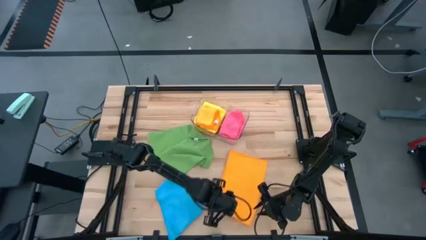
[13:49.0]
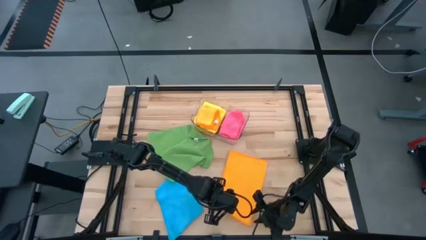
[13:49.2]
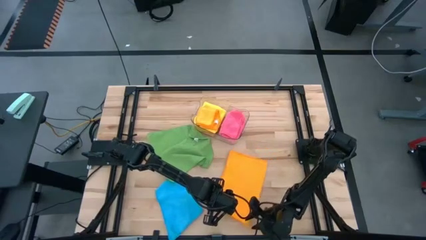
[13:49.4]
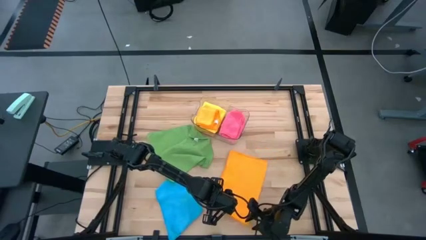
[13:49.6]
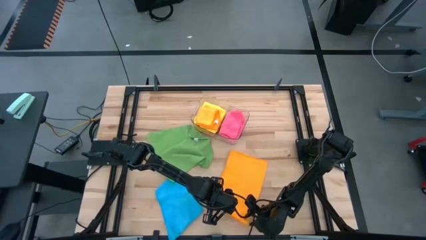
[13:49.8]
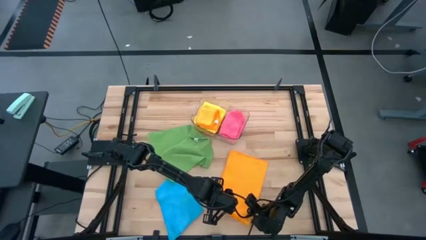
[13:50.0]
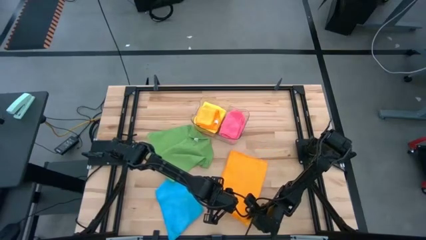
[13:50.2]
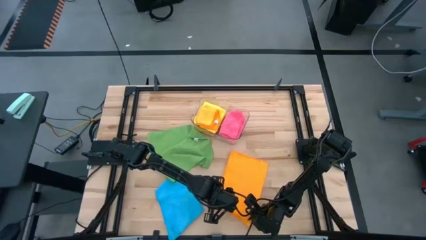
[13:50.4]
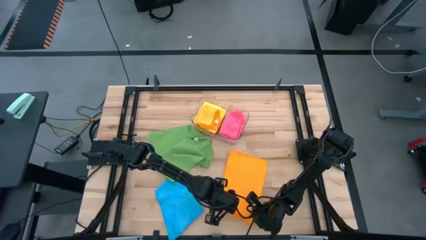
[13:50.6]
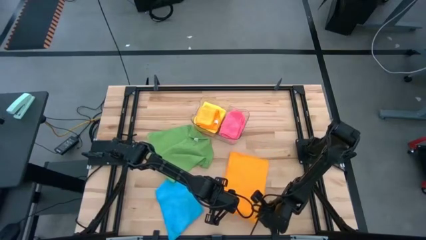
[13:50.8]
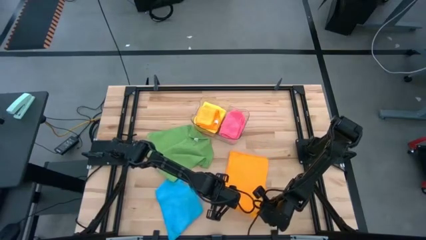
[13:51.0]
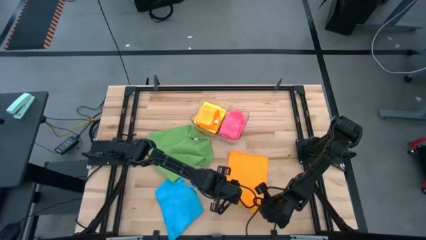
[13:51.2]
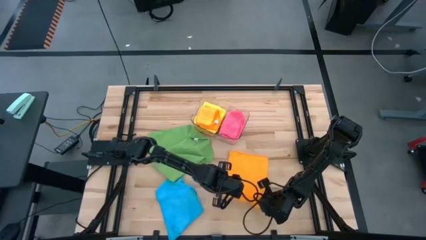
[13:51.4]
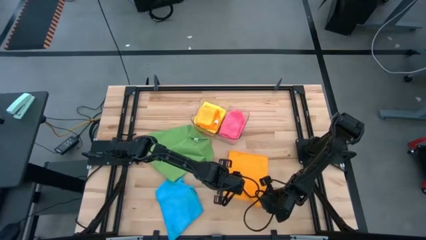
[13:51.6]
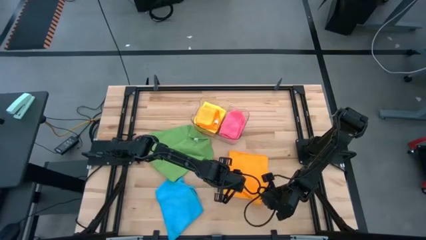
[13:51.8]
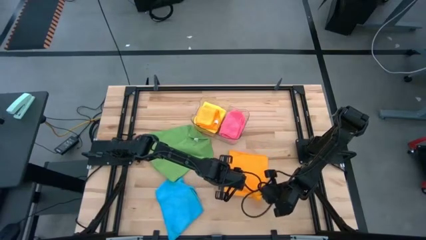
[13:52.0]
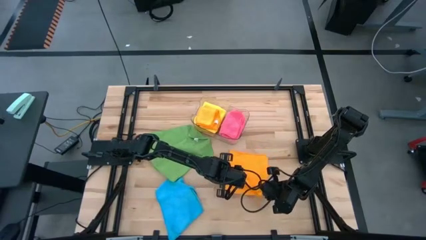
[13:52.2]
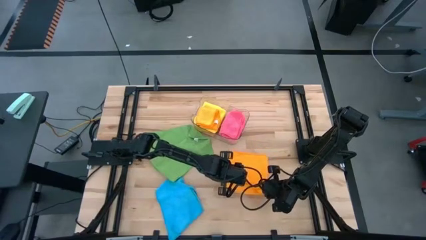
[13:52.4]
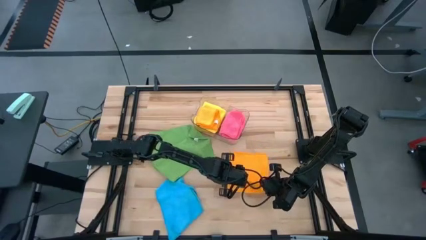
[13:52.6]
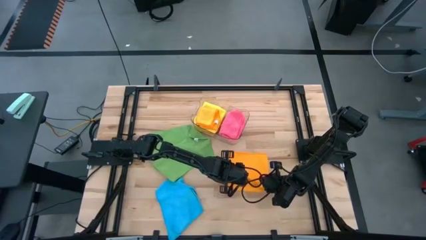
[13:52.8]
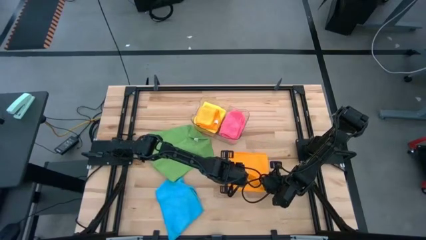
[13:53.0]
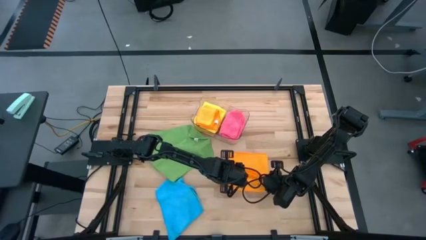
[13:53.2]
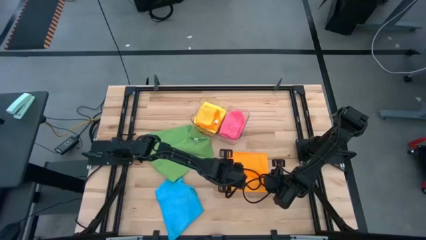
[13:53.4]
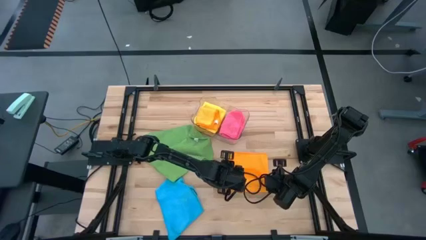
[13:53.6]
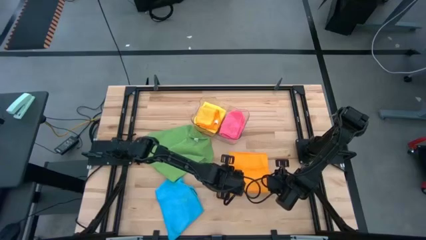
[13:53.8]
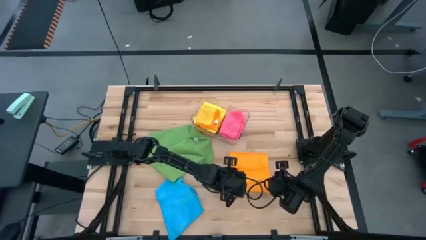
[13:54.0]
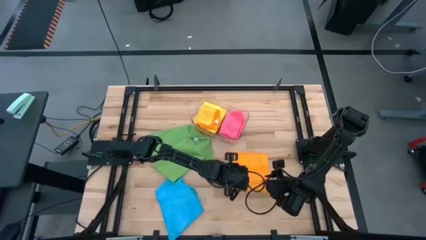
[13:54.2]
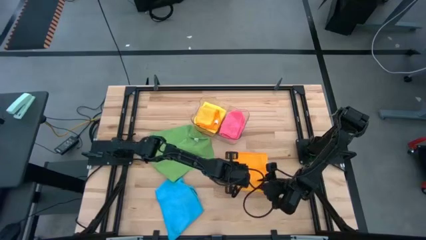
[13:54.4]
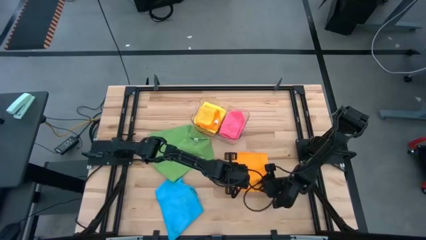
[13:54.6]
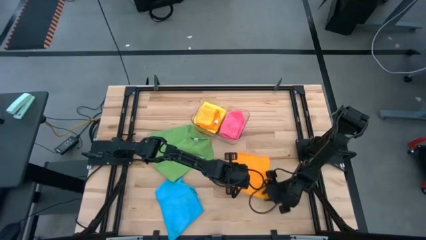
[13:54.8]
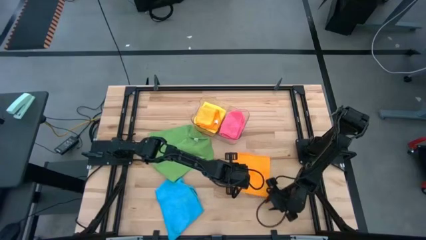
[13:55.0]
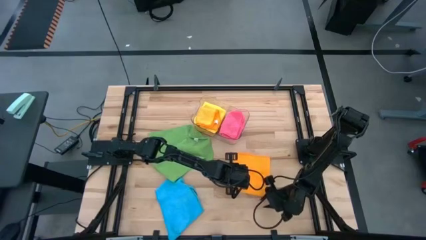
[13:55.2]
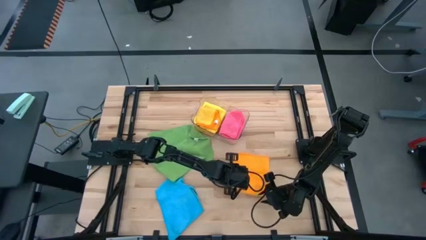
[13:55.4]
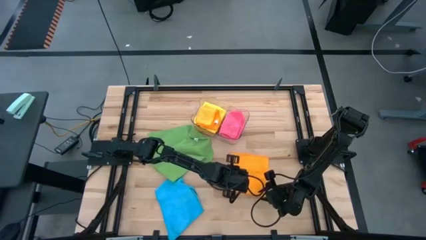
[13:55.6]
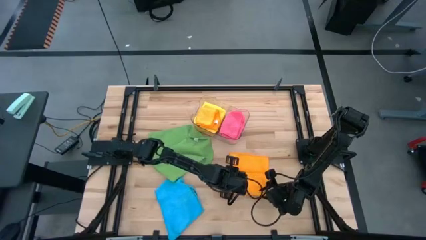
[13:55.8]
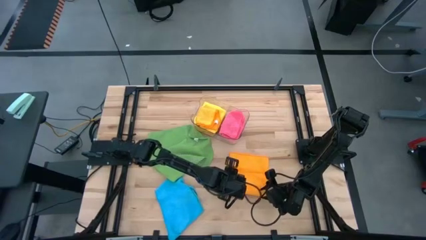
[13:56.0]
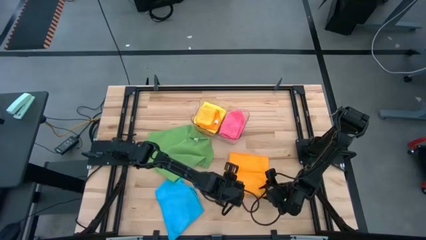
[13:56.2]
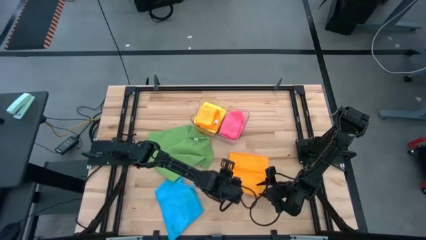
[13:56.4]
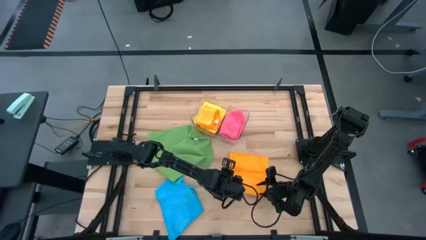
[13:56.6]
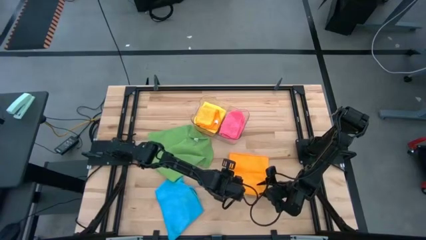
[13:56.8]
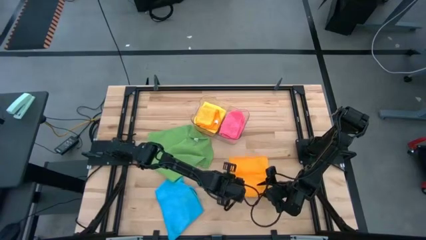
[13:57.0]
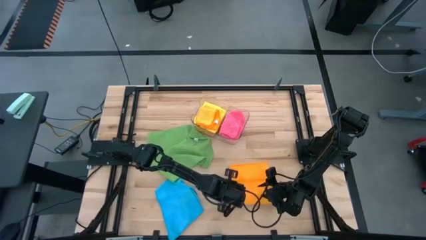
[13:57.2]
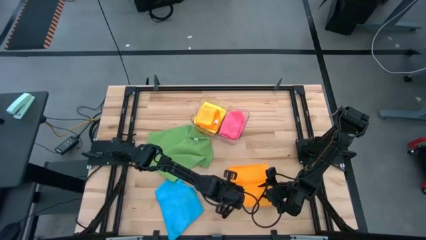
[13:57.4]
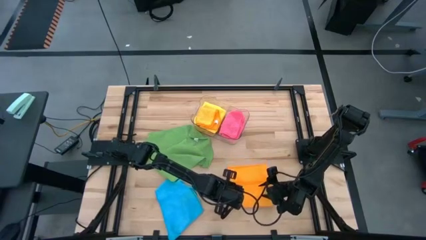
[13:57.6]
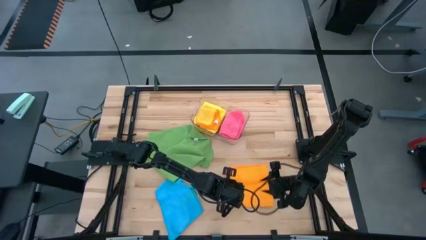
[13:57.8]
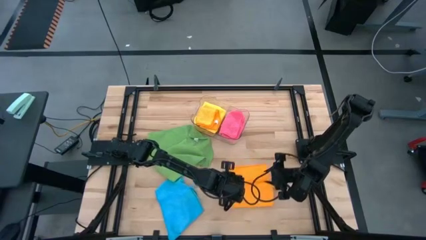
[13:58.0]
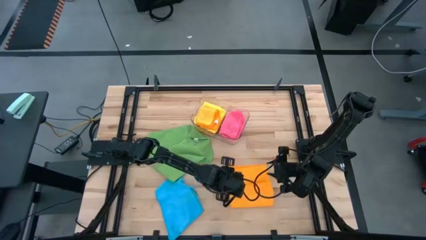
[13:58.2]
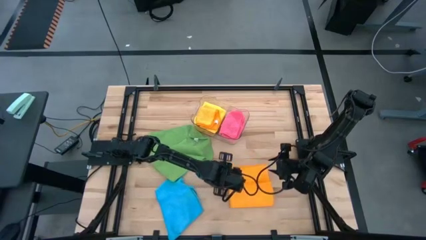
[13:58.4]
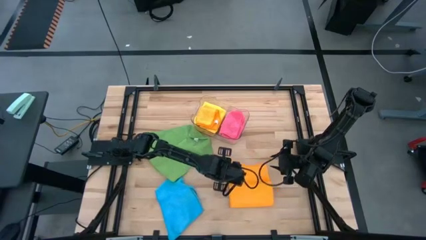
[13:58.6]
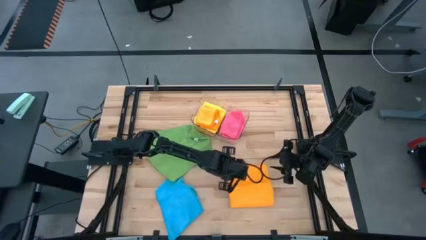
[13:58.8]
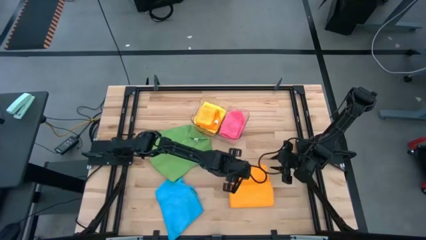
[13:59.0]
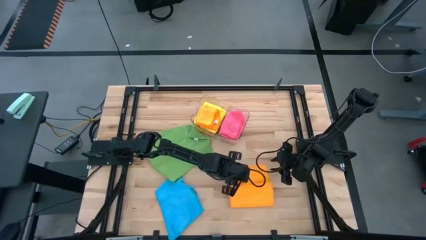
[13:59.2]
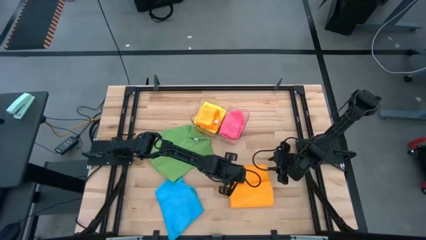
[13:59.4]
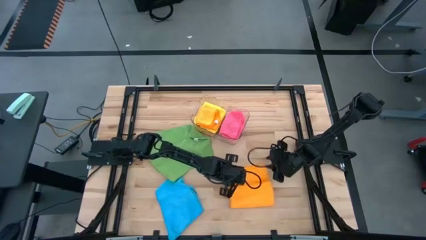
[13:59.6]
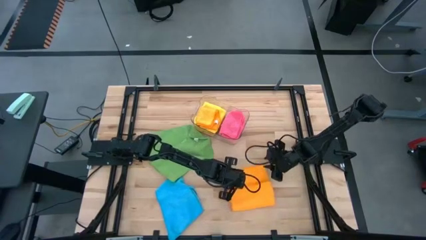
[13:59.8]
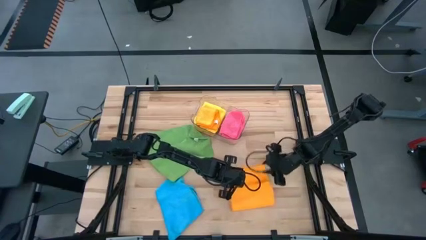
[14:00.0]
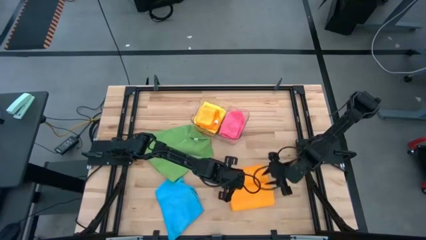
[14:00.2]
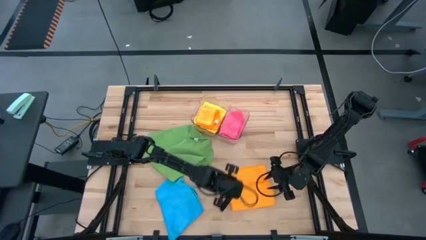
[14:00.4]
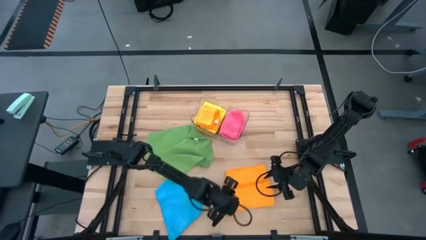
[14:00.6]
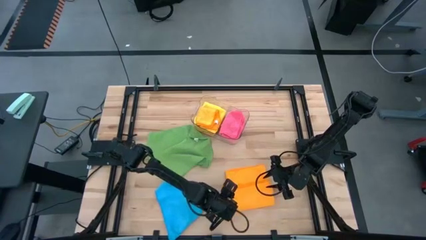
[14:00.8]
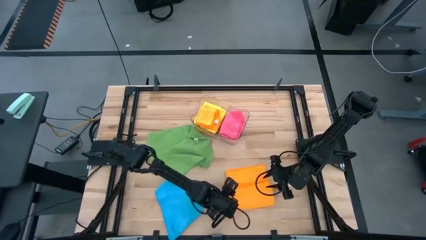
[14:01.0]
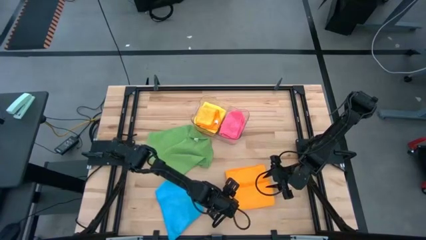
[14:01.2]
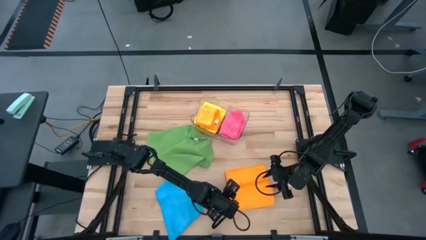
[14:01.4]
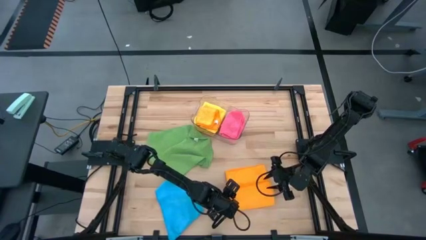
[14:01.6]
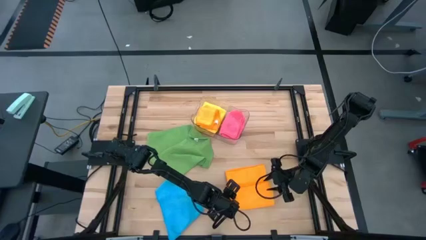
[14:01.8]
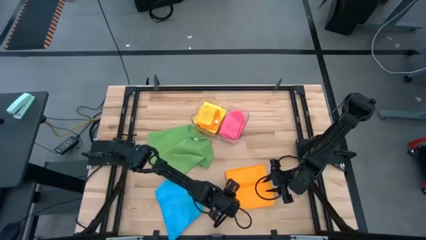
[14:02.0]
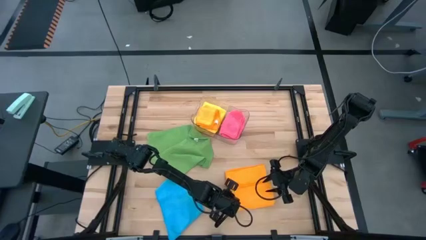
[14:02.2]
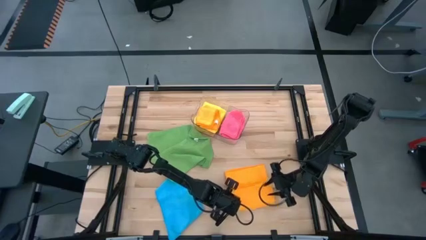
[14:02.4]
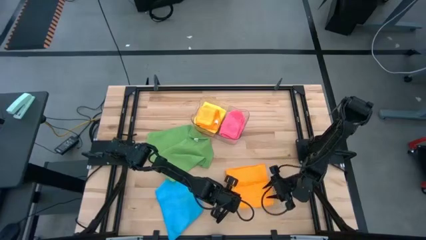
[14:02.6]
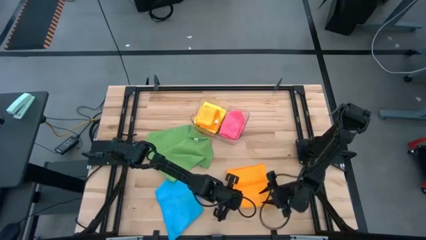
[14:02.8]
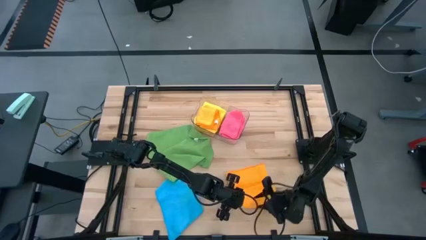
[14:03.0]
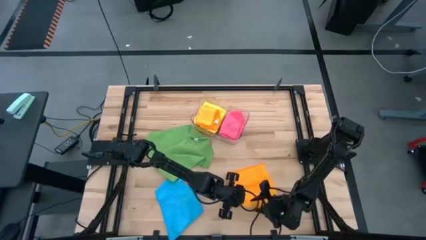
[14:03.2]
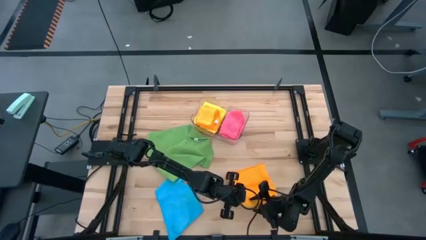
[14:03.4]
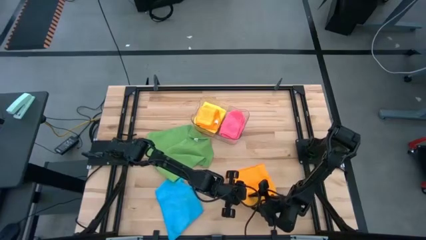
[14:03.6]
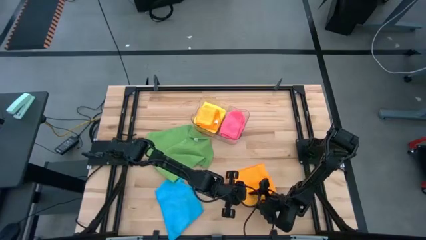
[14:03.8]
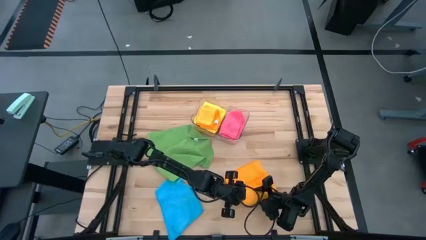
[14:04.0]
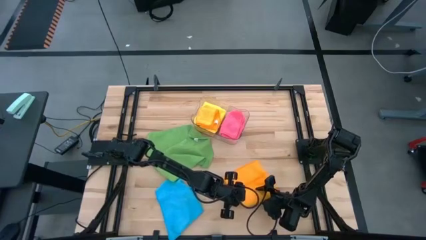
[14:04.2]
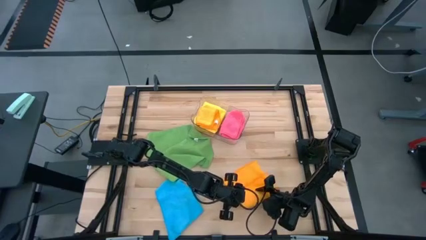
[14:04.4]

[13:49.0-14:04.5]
Task: Fold microfiber towels
Fold the orange microfiber cloth
